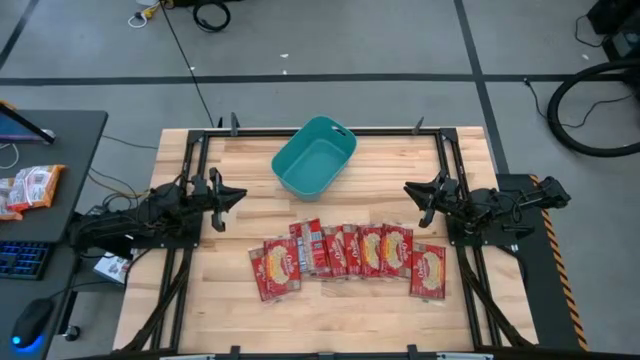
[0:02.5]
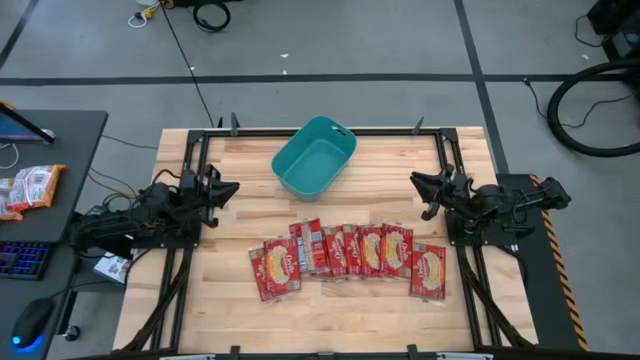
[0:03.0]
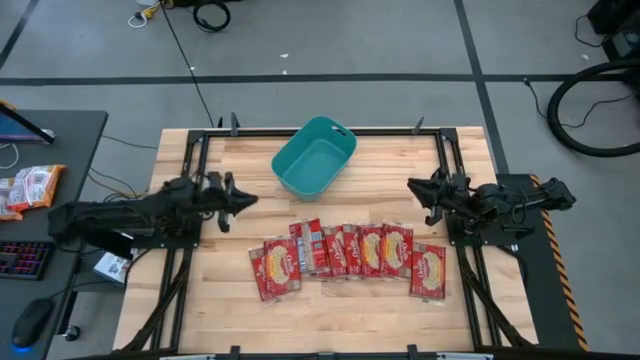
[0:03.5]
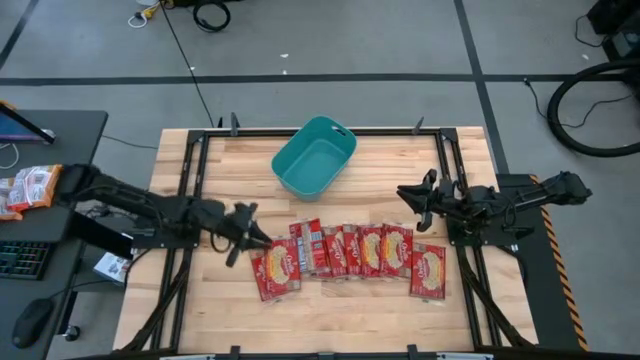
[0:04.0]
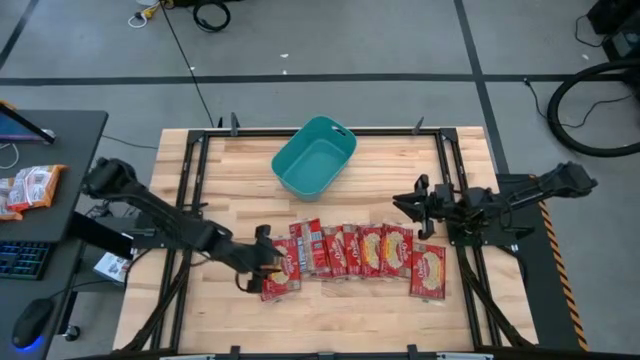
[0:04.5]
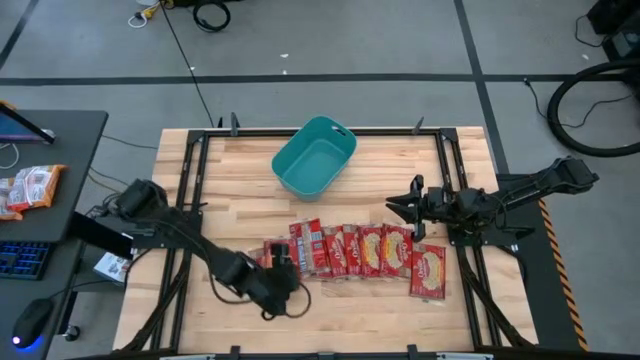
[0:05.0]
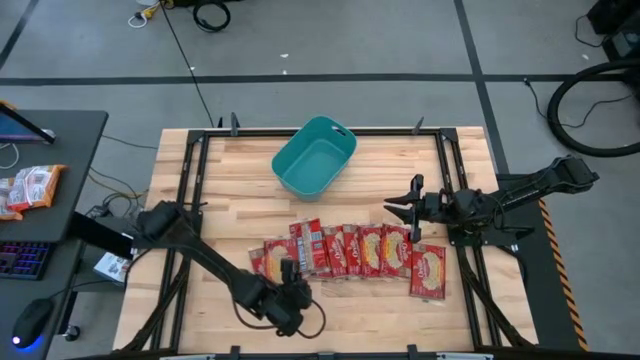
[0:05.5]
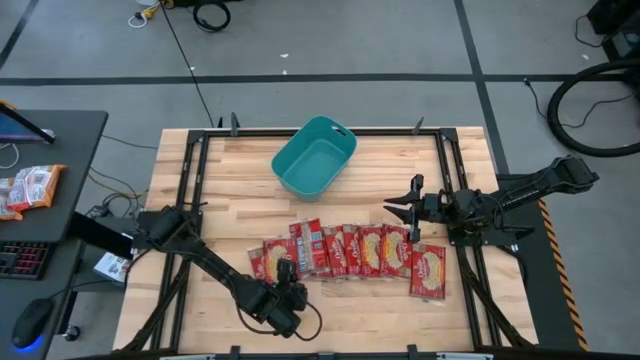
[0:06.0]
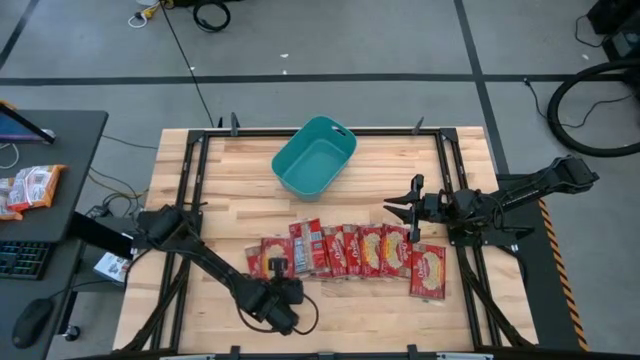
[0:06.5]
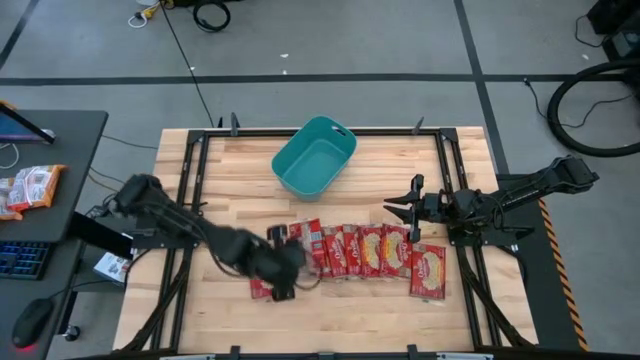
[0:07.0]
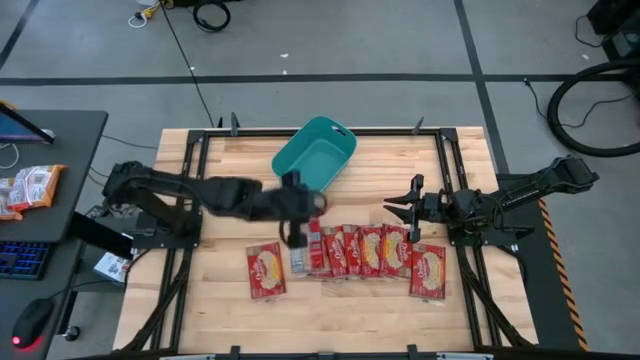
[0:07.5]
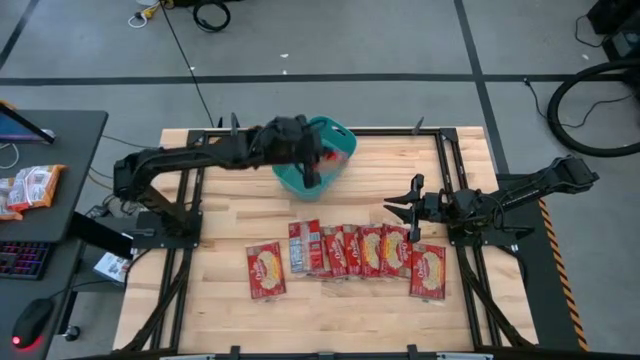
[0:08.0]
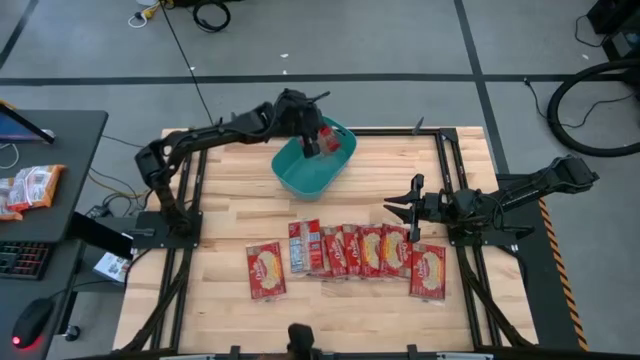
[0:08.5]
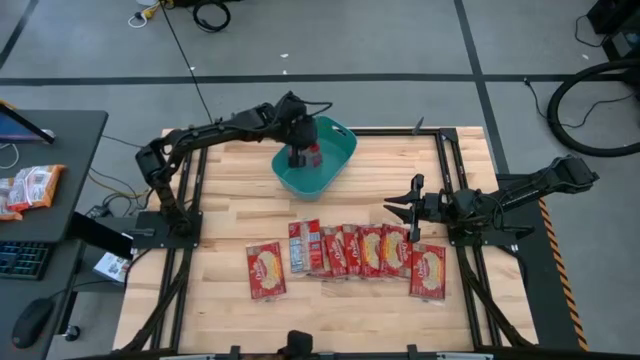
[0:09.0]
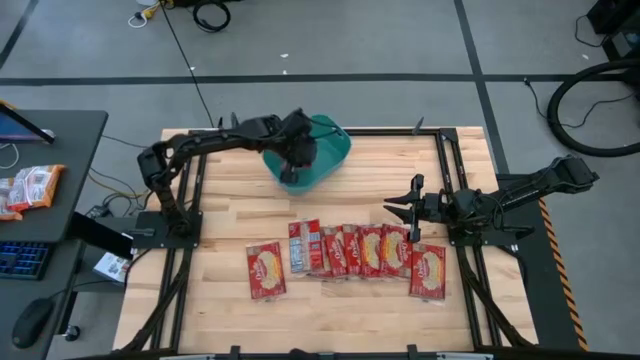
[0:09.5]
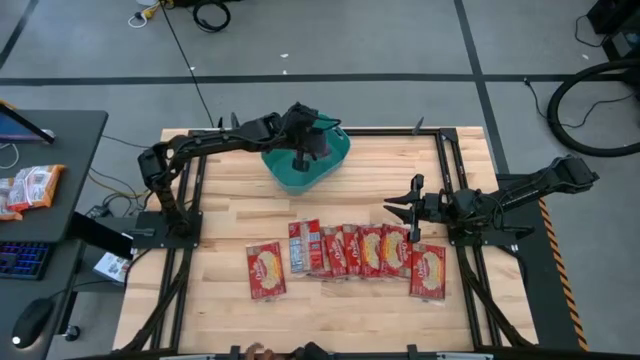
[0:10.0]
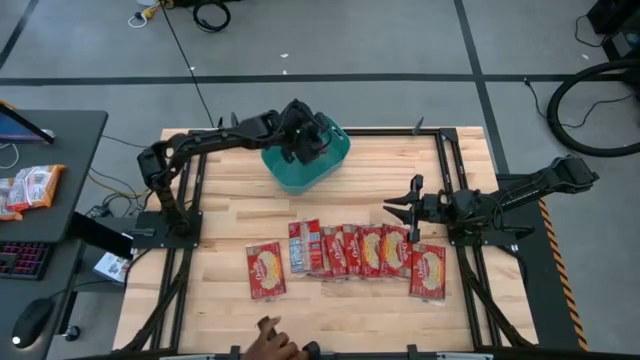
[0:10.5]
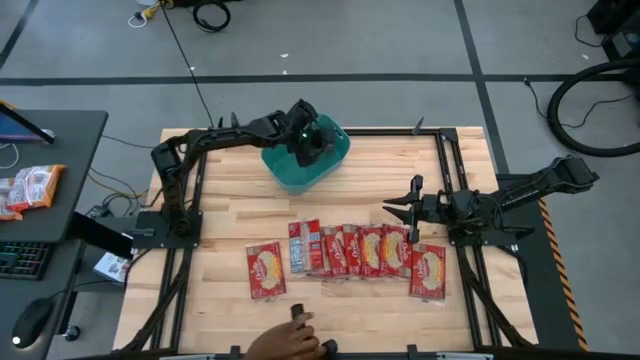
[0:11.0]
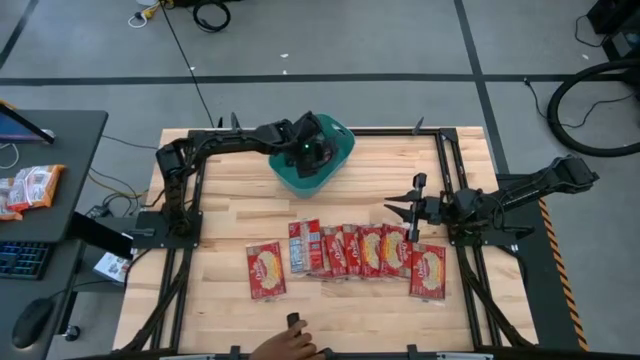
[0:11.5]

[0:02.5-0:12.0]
Task: Sort popcorn bags into baskets
Put the popcorn bag into the green bin

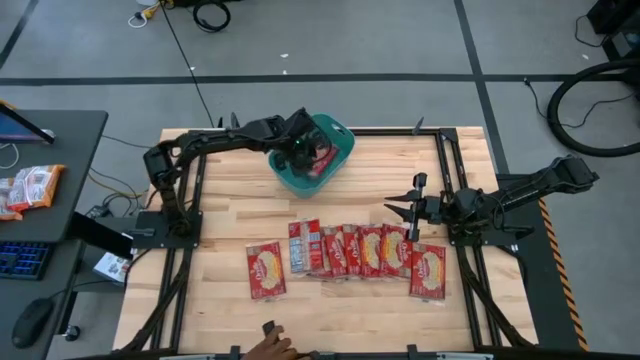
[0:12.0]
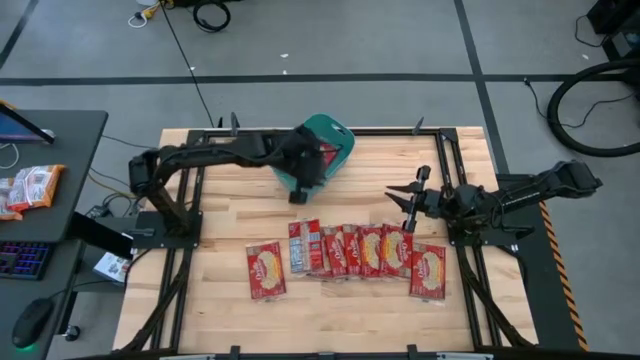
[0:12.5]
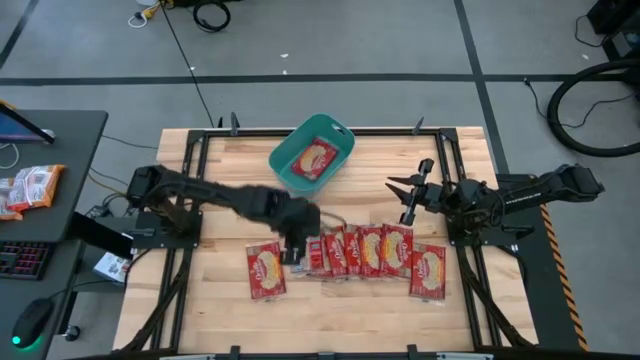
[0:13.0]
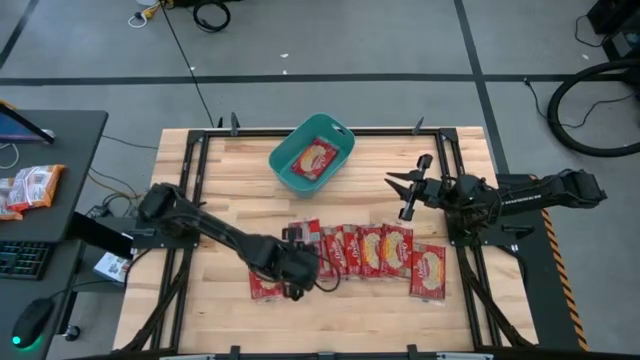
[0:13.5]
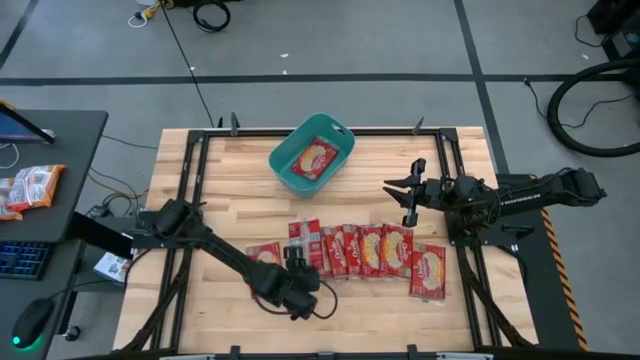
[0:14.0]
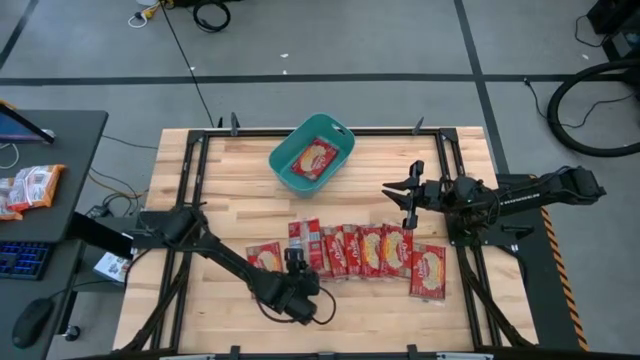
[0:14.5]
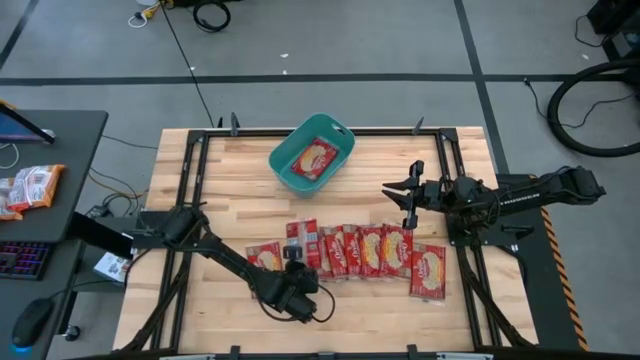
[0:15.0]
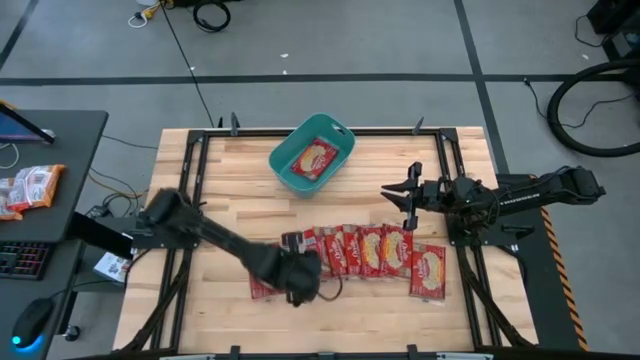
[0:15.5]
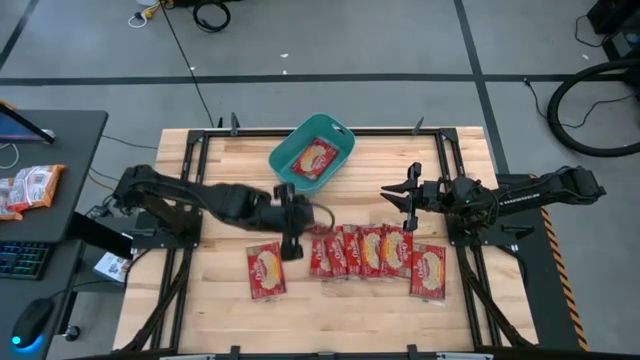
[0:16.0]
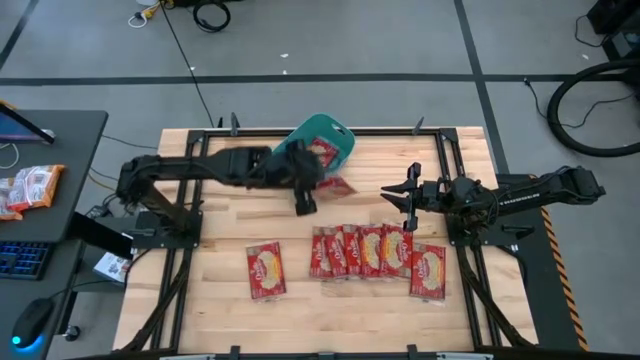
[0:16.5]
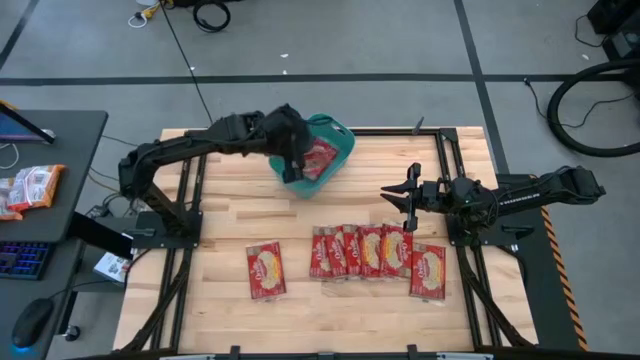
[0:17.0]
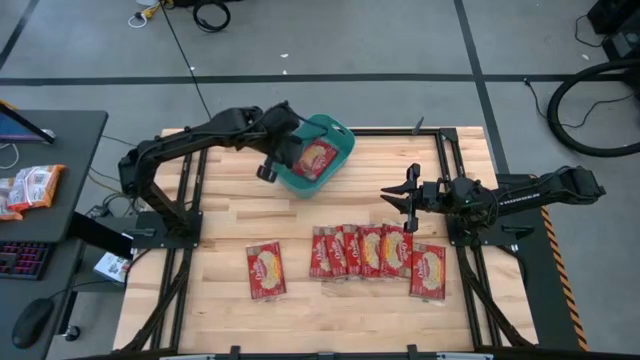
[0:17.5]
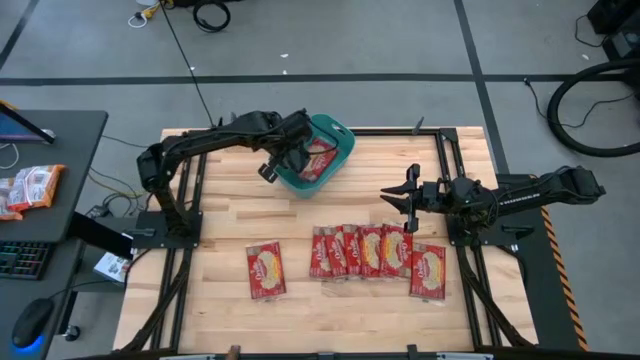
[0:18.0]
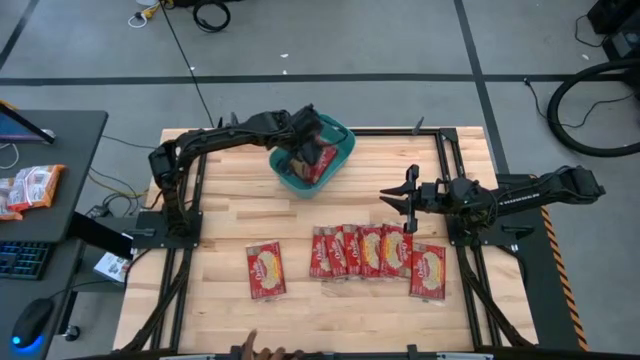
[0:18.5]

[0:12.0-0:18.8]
Put the popcorn bag into the green bin

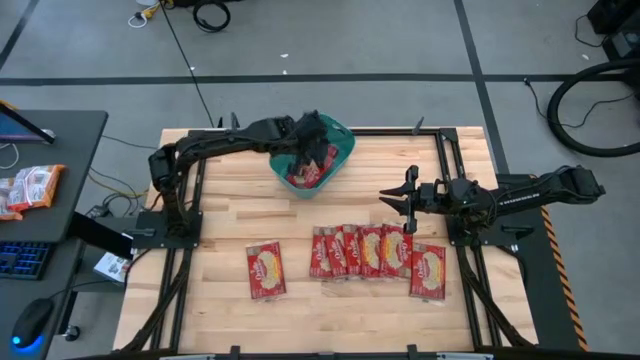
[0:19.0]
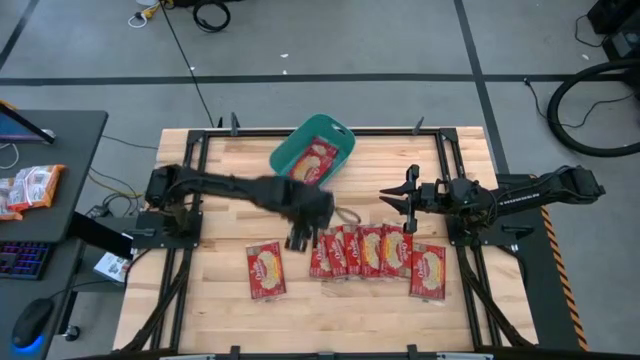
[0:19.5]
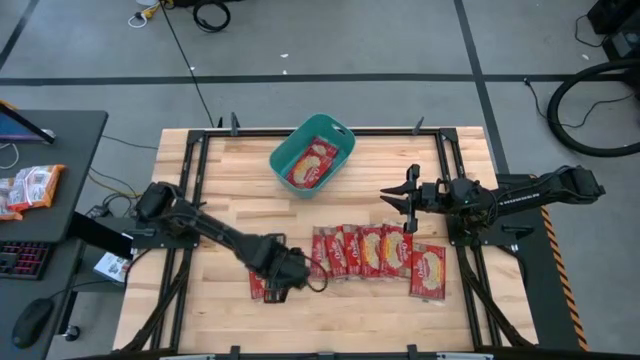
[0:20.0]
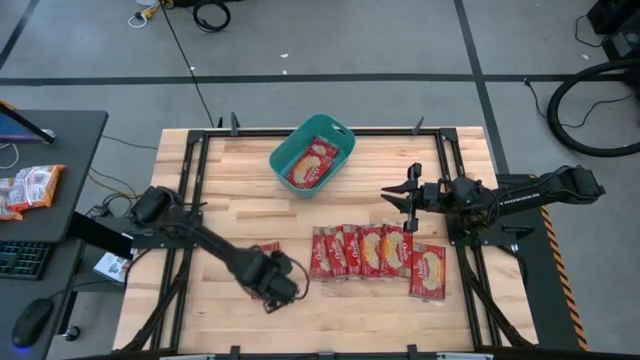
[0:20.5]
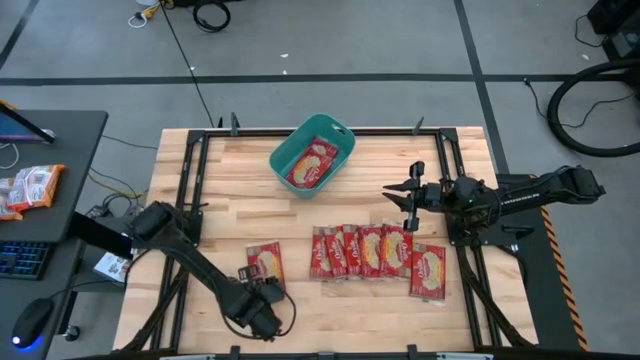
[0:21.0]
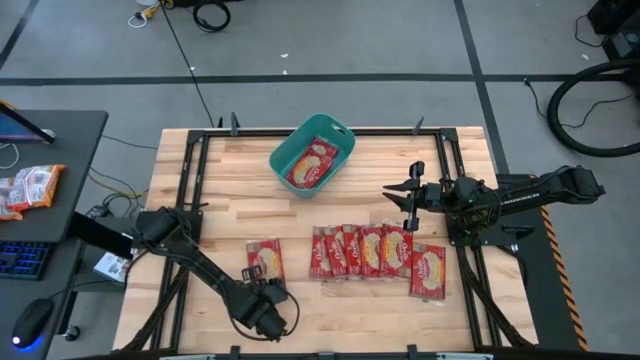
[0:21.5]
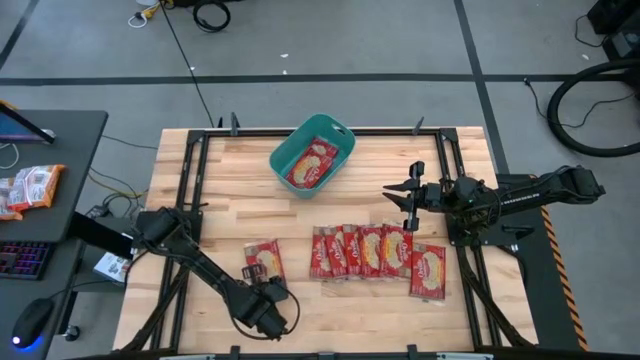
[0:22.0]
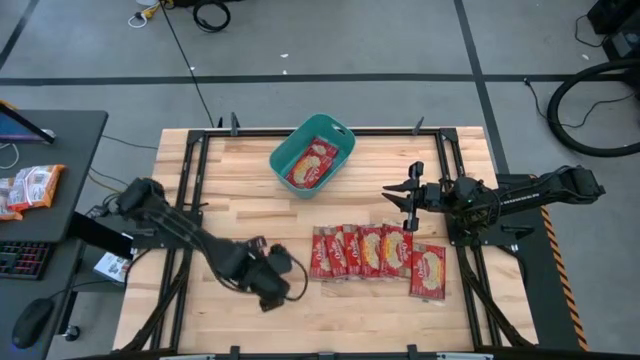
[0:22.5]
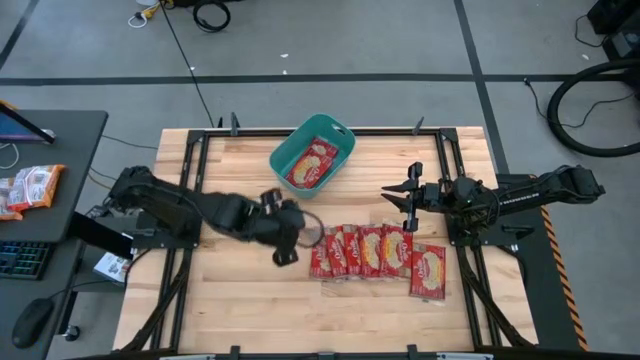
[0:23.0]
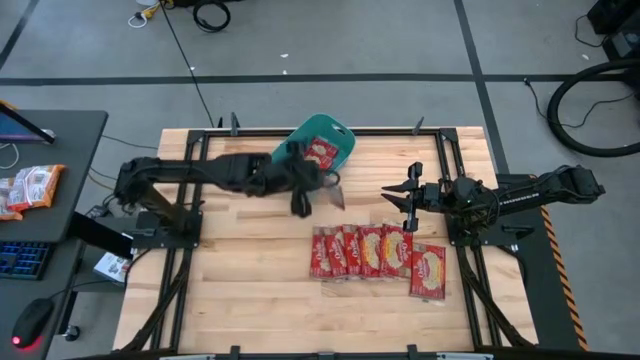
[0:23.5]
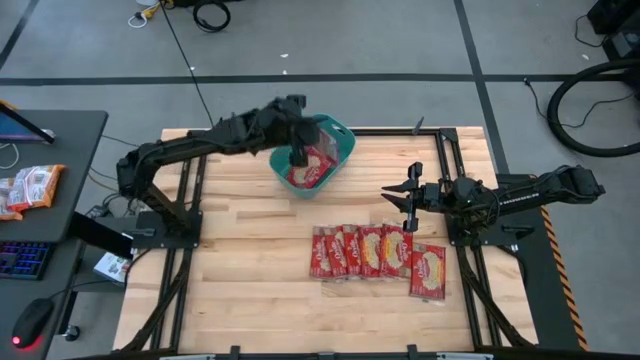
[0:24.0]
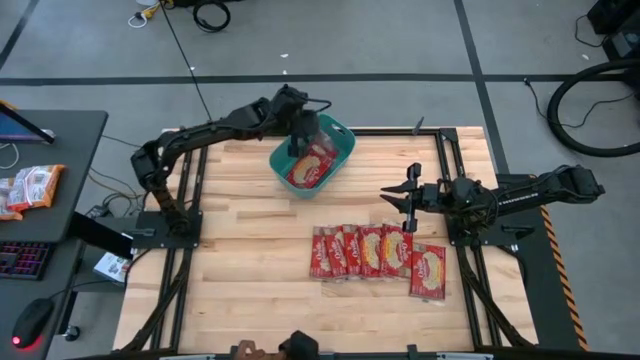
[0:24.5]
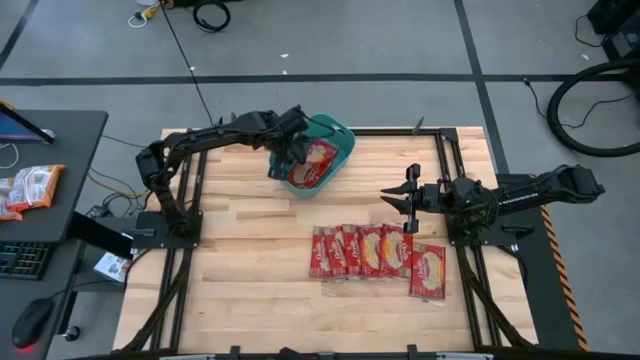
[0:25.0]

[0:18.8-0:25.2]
Put the popcorn bag into the green bin
